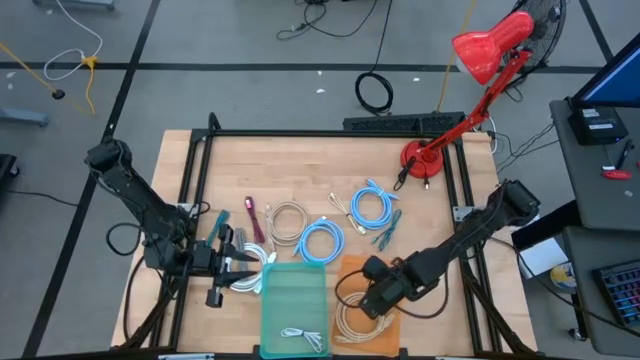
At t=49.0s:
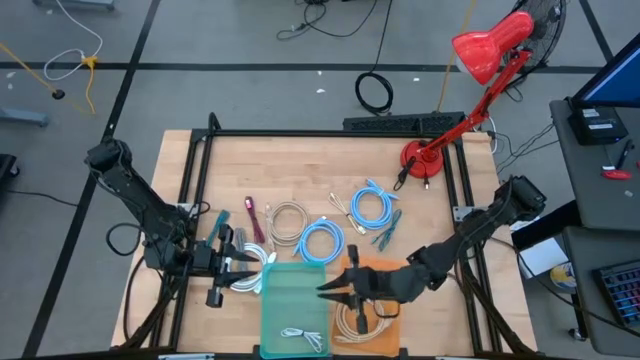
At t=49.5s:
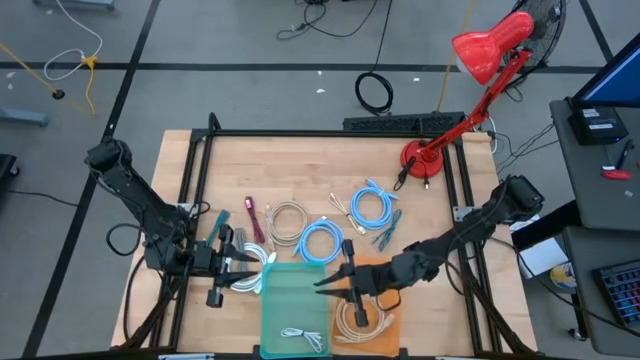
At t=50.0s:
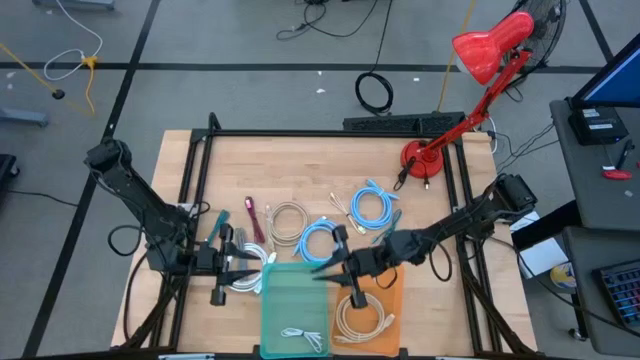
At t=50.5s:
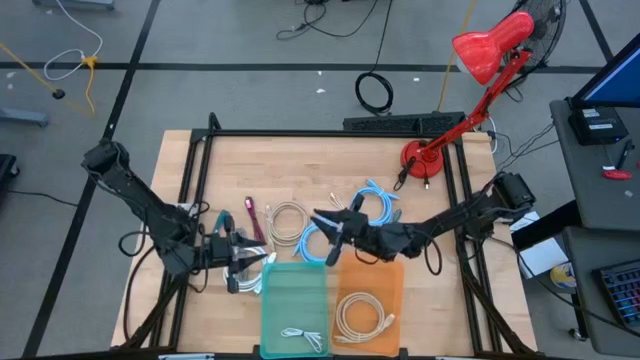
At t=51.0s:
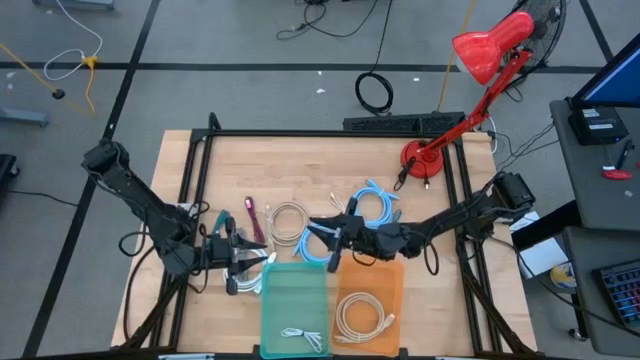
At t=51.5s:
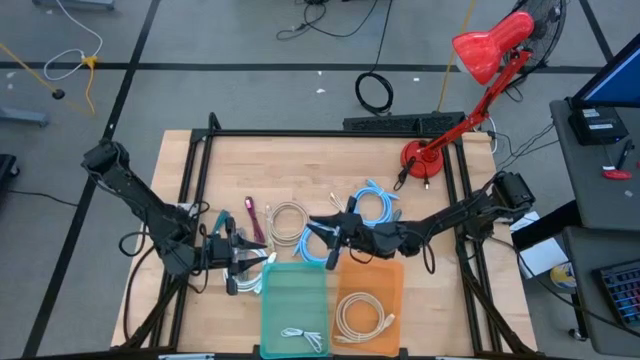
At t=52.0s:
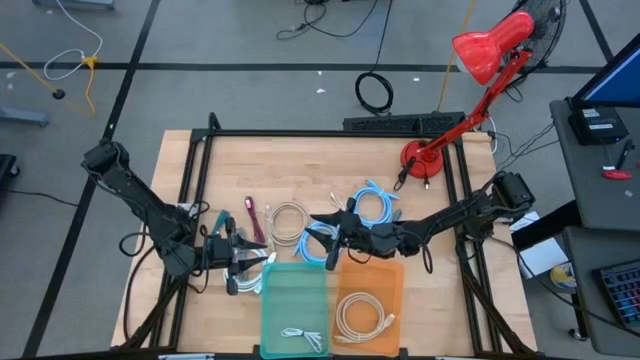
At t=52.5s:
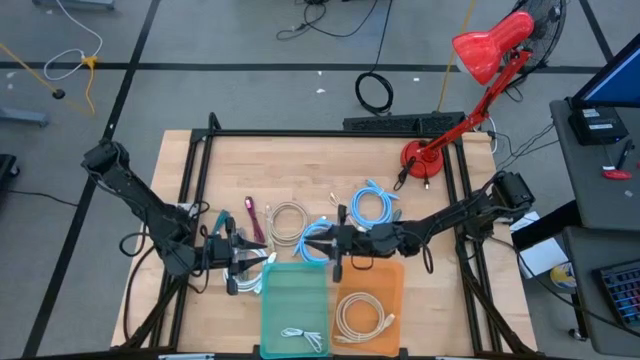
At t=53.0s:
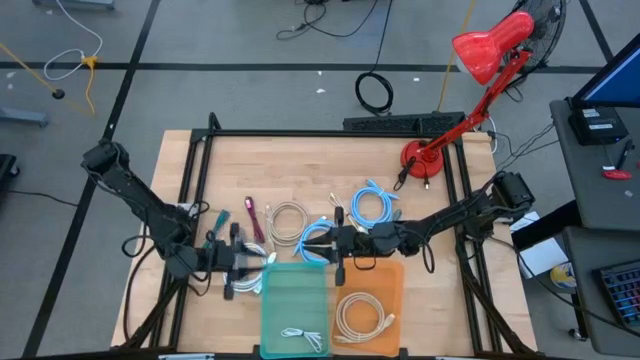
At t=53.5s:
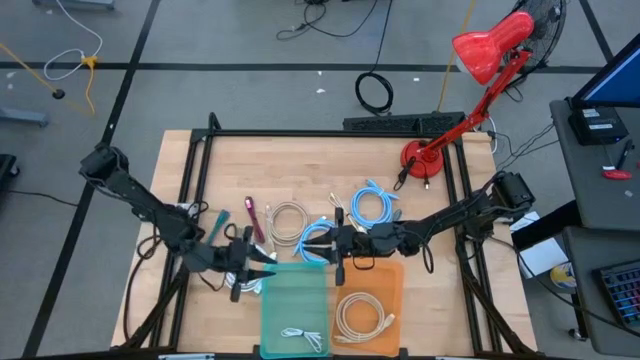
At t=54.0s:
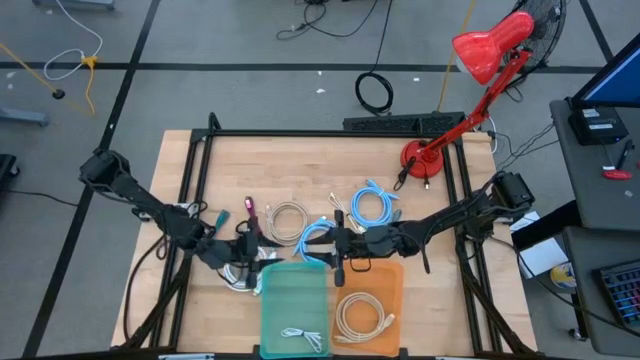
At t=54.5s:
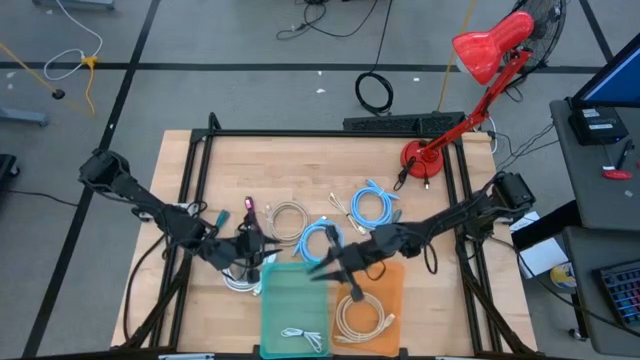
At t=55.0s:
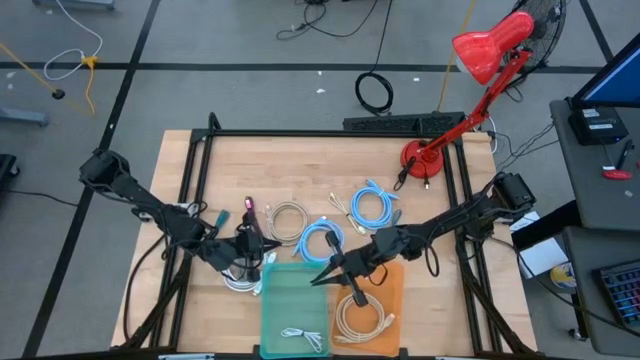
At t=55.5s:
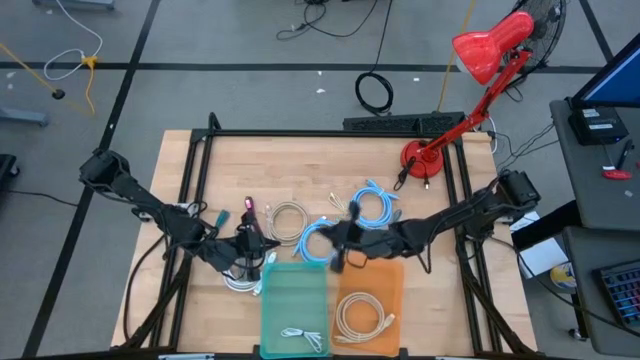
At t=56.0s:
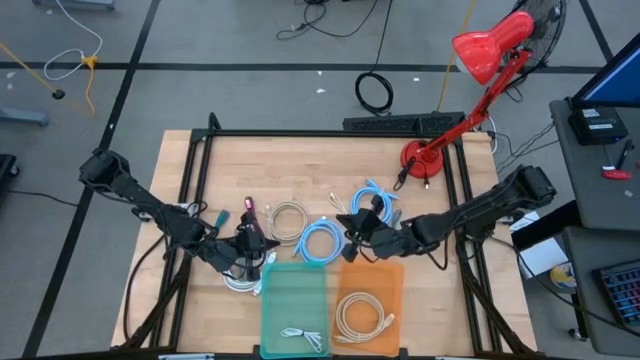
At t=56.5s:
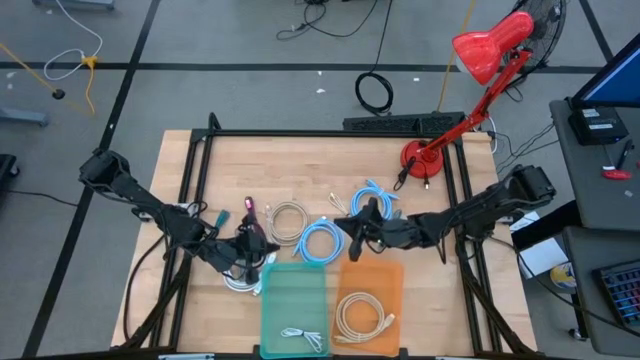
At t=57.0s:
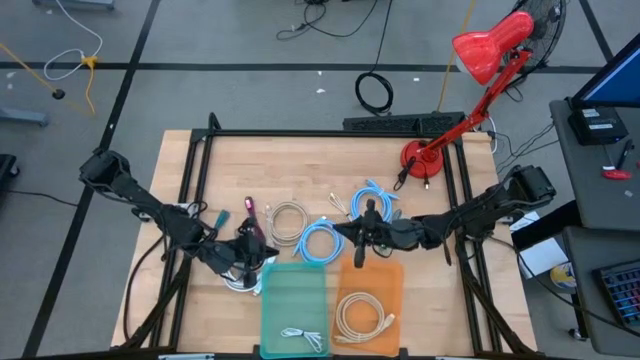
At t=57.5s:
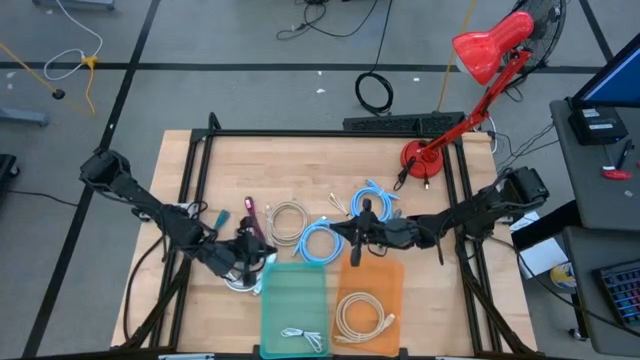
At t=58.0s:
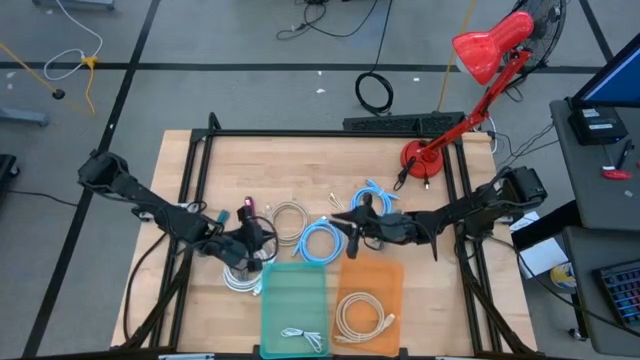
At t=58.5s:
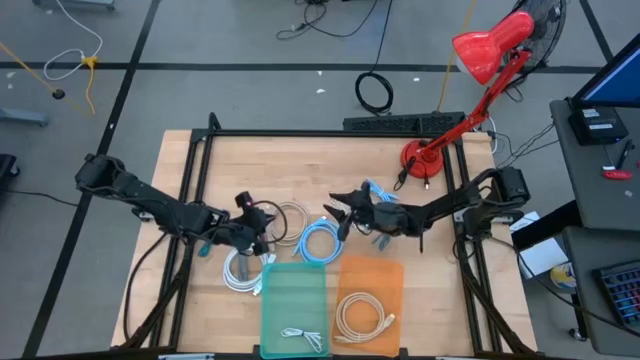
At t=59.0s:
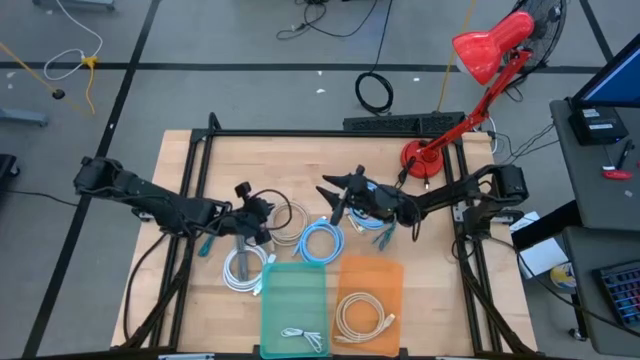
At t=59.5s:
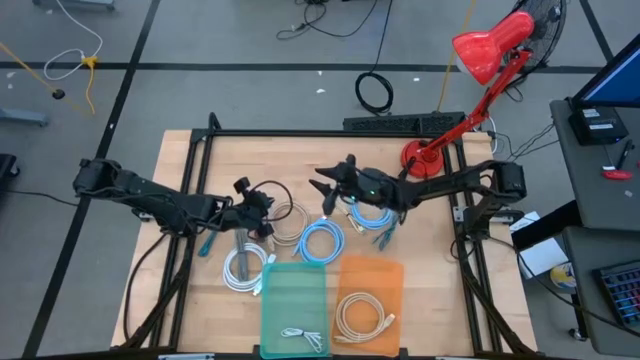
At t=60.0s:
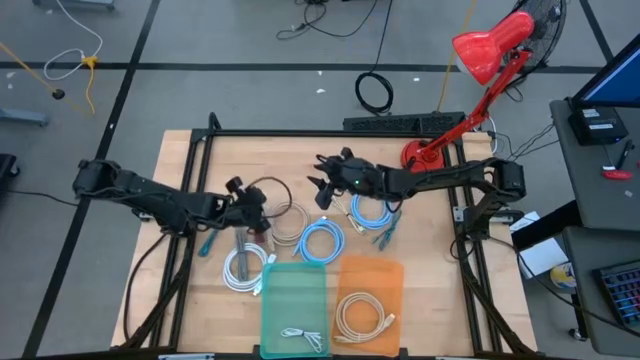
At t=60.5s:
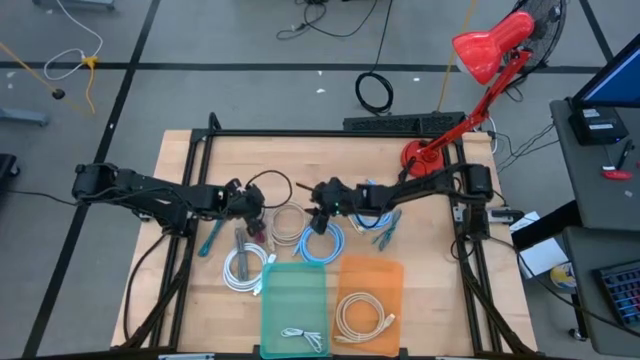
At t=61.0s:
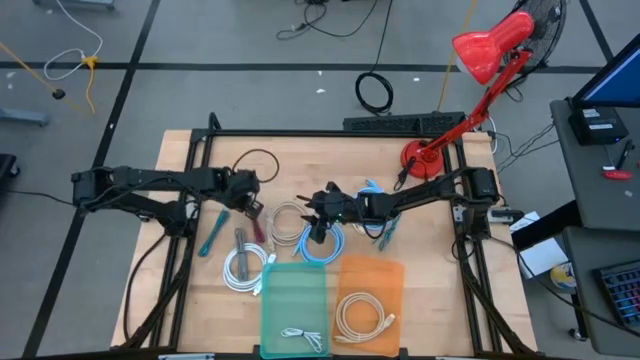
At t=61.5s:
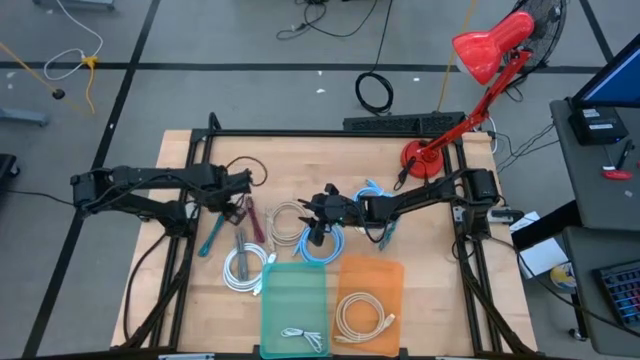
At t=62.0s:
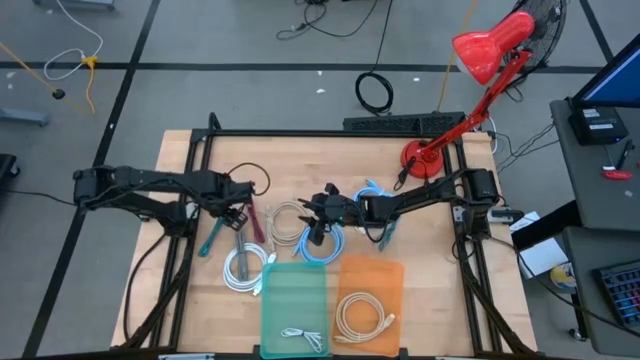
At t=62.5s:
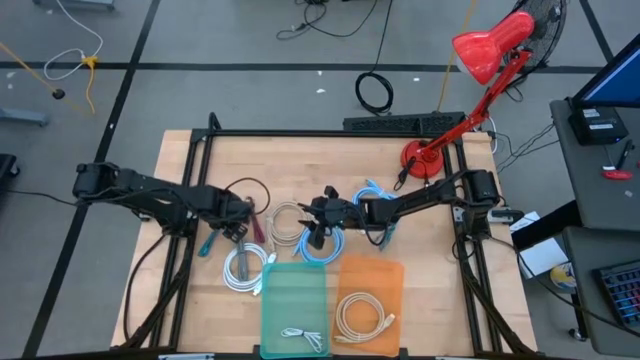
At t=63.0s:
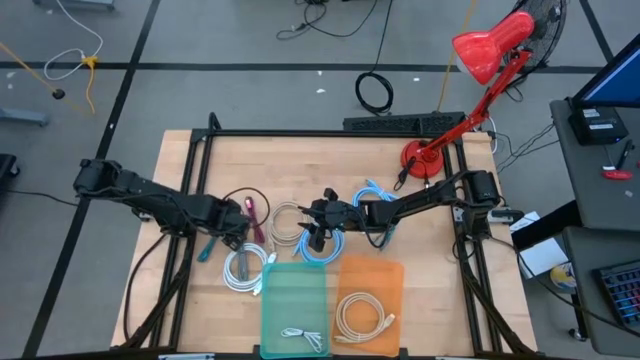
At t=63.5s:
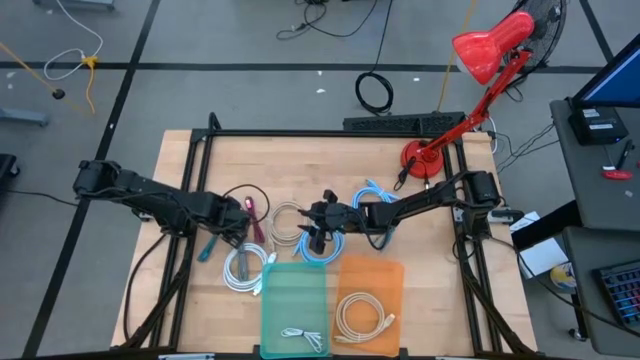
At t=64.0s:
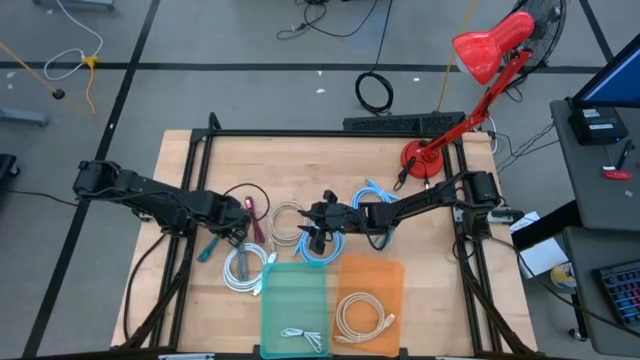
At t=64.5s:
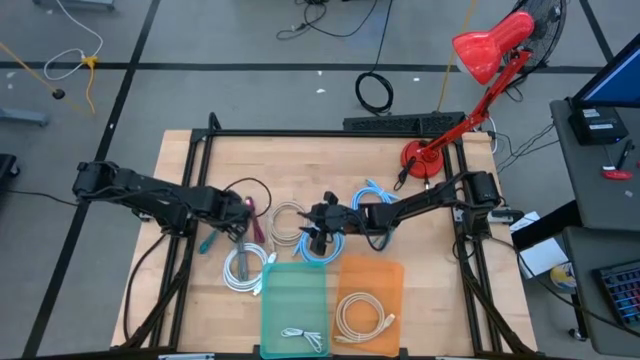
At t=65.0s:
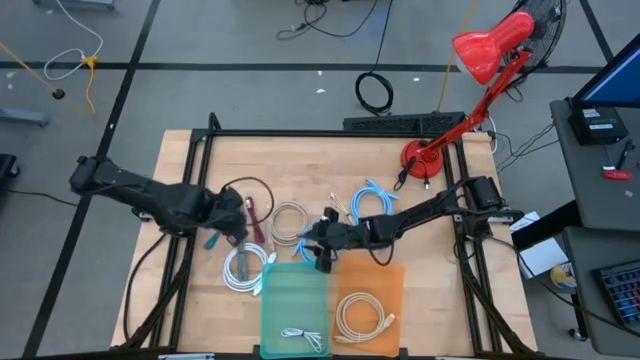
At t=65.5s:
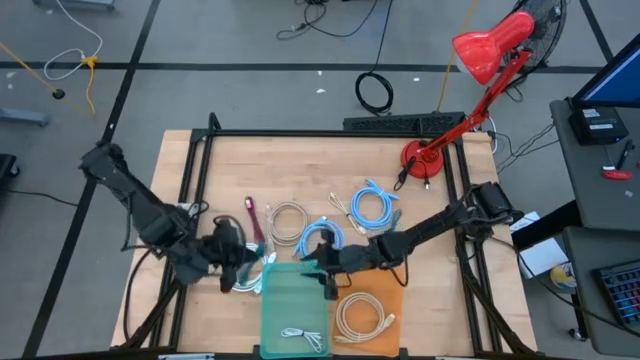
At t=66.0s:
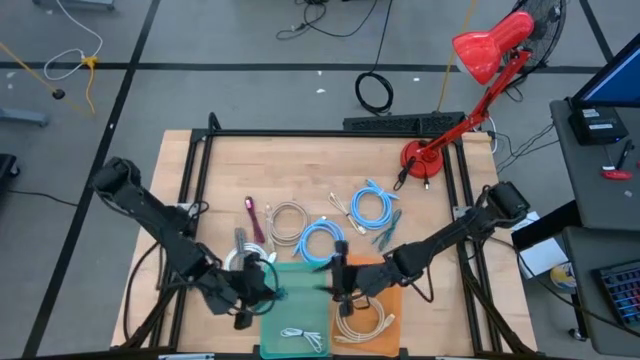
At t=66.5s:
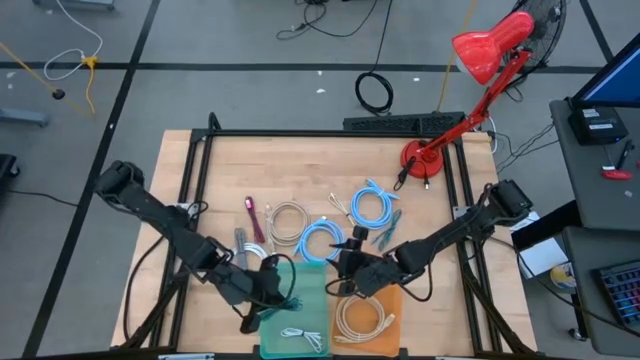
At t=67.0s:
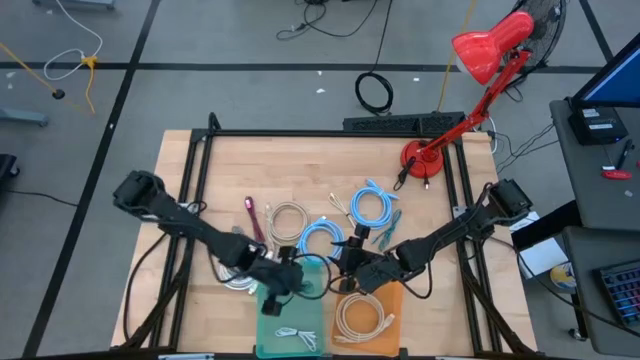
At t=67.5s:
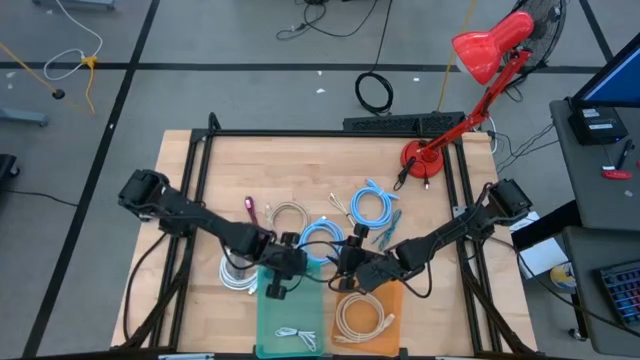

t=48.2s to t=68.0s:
Task: Pick & Place USB Port
Put the left blue charger cable into the green bin

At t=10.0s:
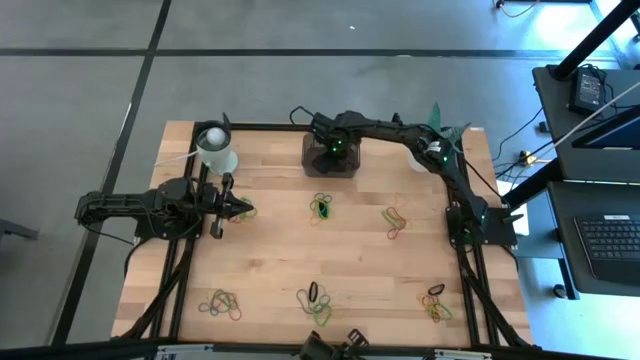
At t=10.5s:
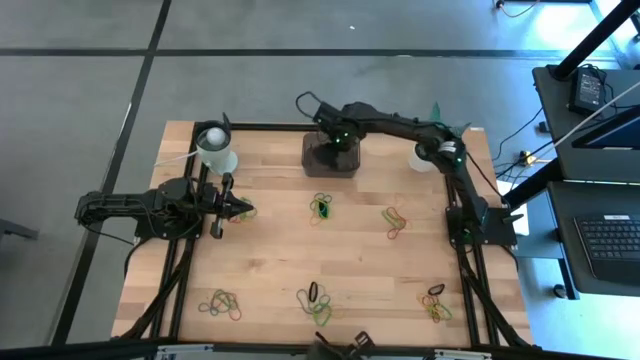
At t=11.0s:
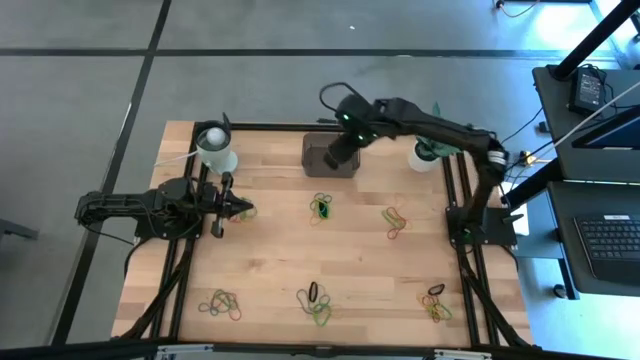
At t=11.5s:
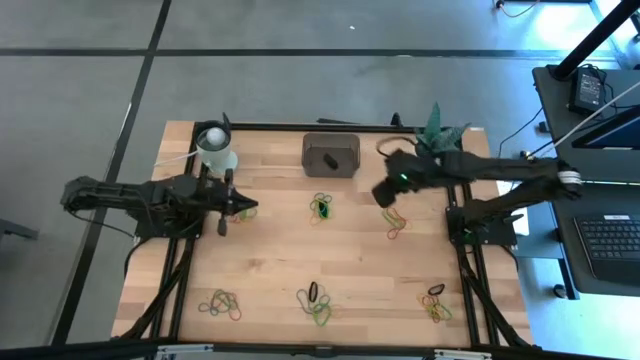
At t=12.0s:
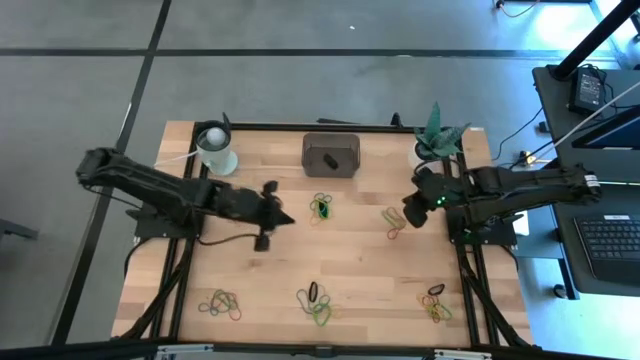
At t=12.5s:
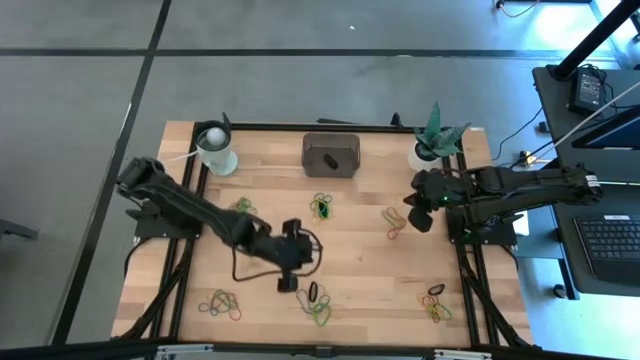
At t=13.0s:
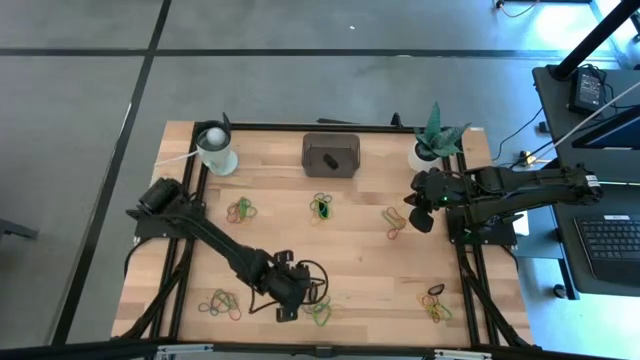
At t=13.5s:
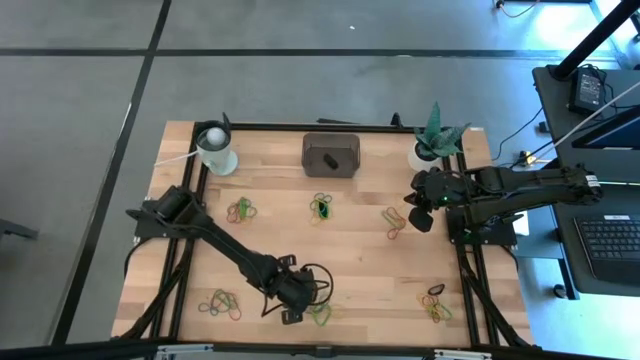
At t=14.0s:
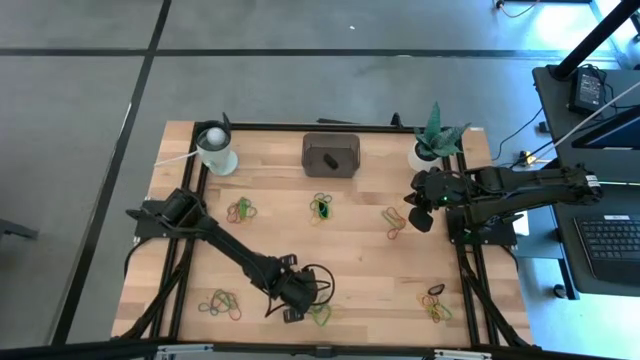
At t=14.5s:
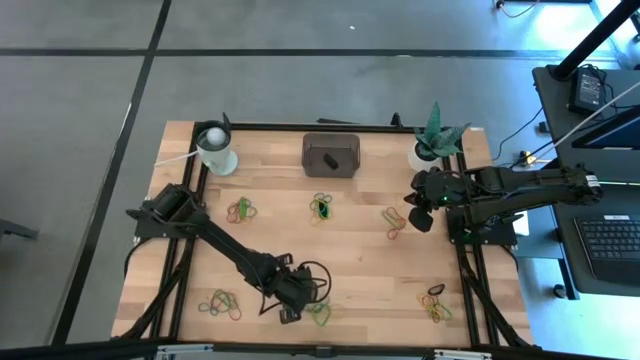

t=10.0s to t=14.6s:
Task: Pick and place rubber bands into bin
Put the blue rubber band into the bin
